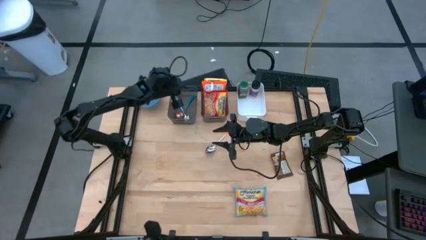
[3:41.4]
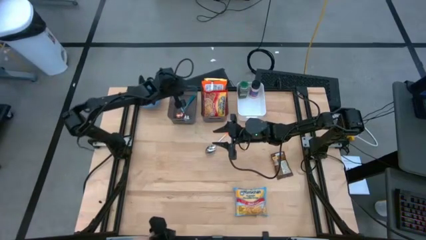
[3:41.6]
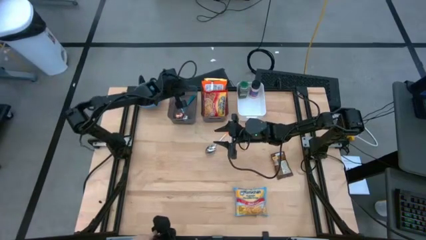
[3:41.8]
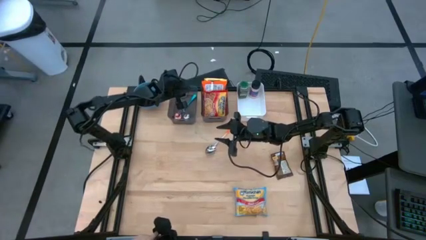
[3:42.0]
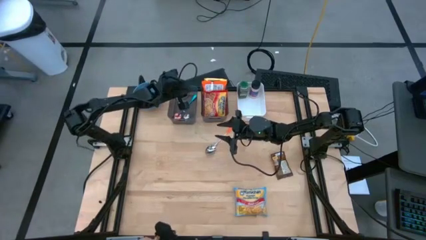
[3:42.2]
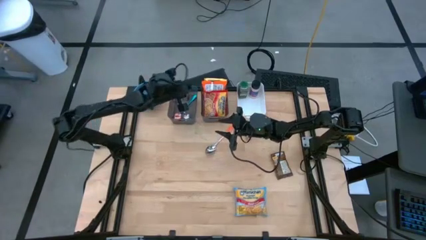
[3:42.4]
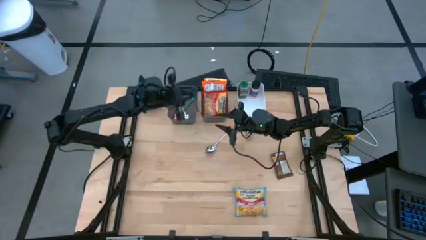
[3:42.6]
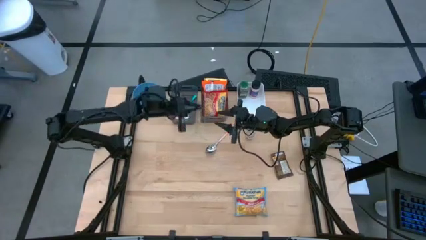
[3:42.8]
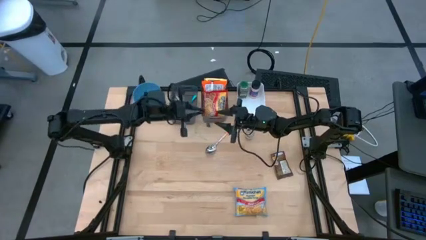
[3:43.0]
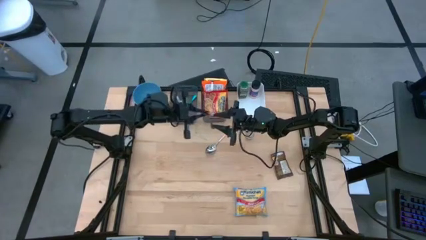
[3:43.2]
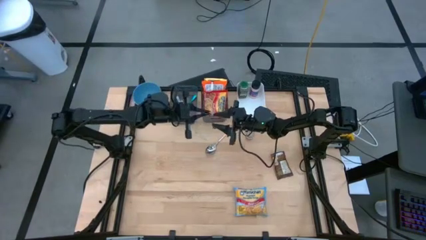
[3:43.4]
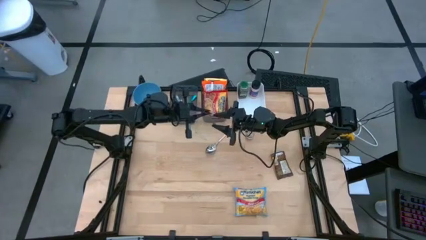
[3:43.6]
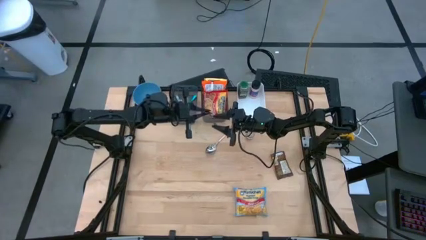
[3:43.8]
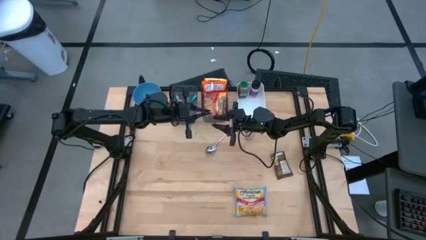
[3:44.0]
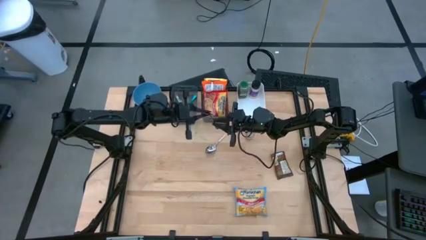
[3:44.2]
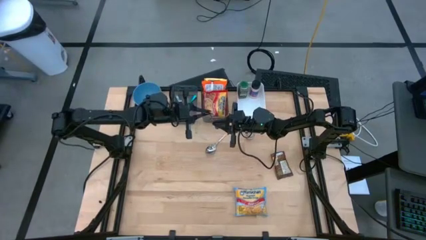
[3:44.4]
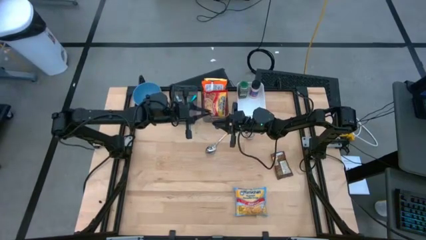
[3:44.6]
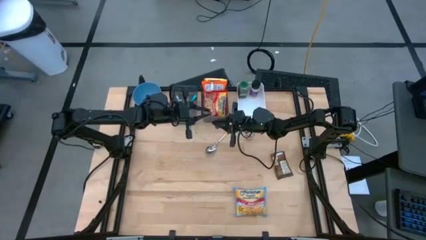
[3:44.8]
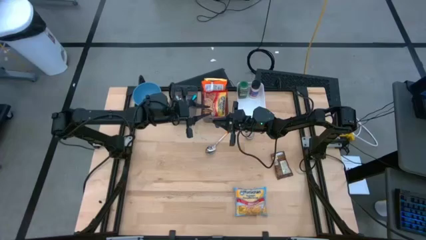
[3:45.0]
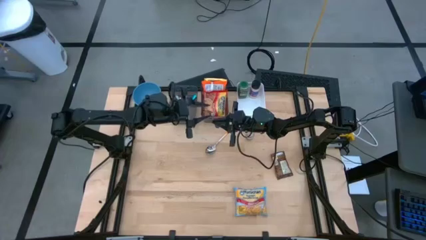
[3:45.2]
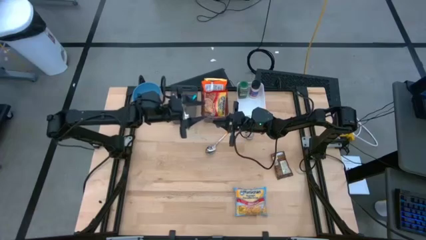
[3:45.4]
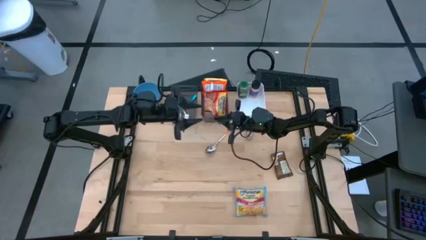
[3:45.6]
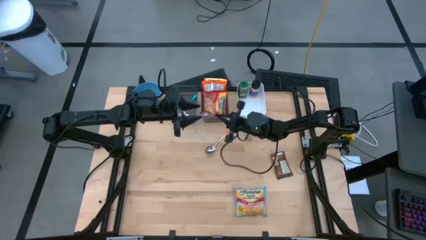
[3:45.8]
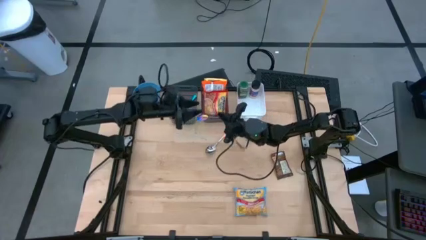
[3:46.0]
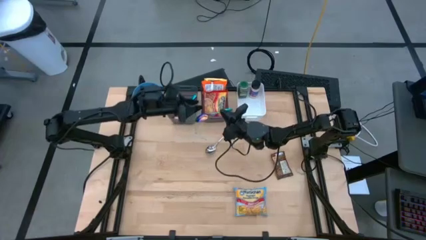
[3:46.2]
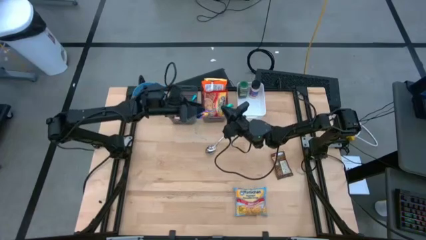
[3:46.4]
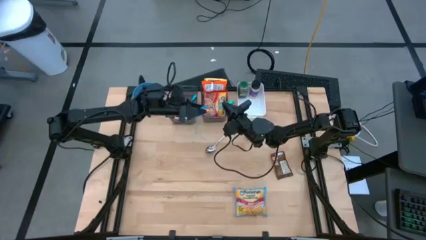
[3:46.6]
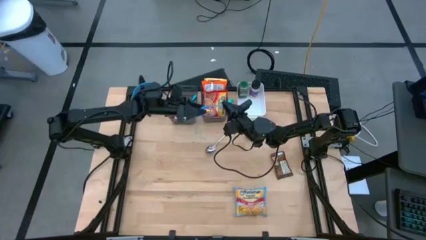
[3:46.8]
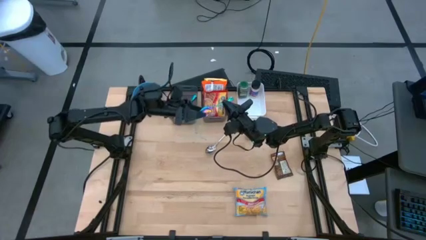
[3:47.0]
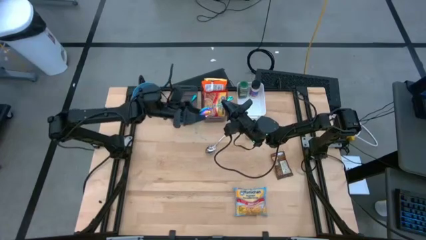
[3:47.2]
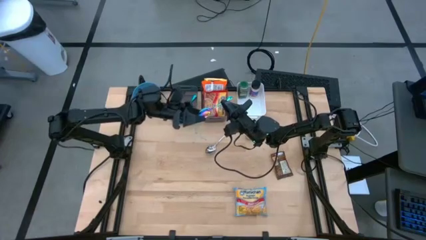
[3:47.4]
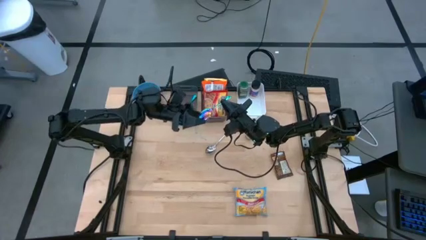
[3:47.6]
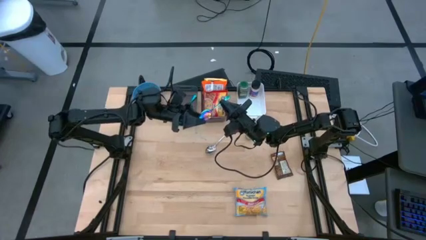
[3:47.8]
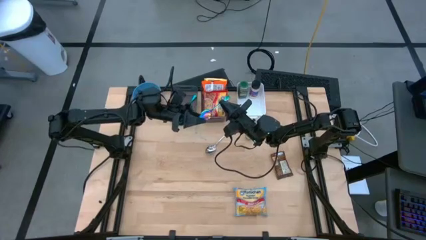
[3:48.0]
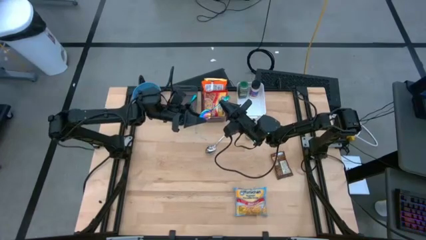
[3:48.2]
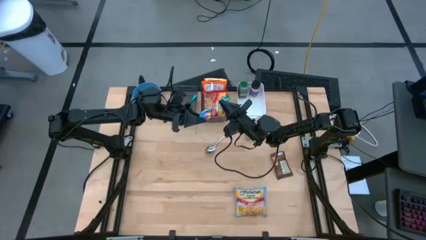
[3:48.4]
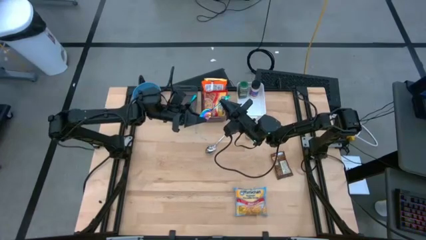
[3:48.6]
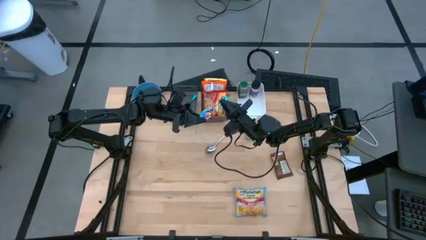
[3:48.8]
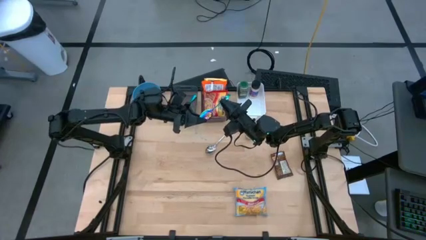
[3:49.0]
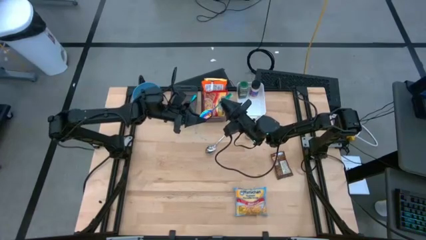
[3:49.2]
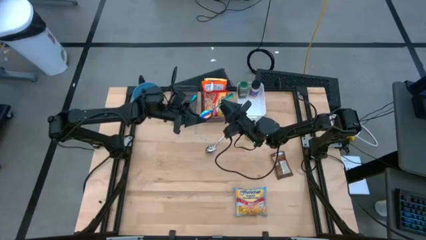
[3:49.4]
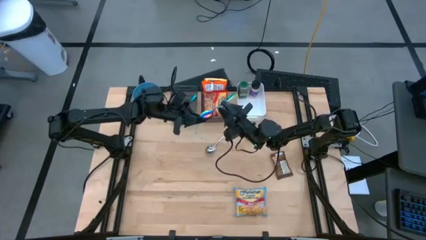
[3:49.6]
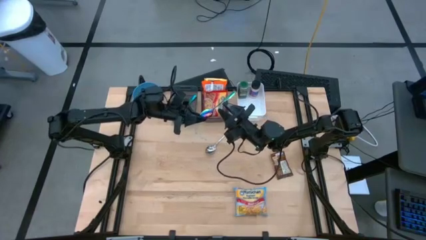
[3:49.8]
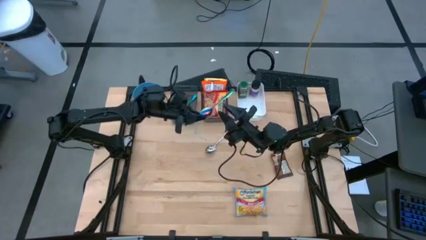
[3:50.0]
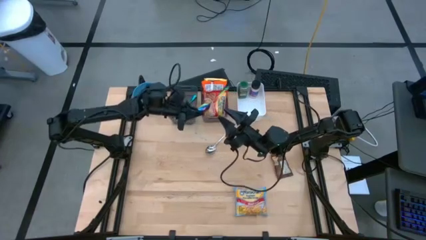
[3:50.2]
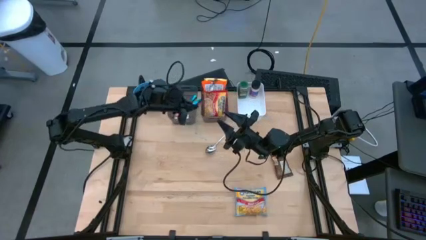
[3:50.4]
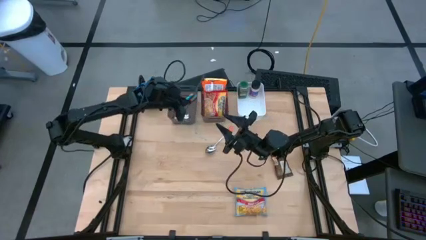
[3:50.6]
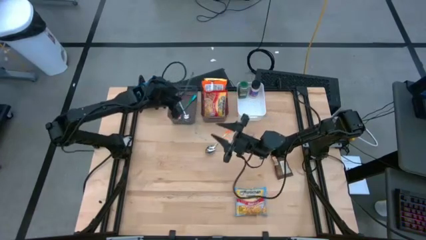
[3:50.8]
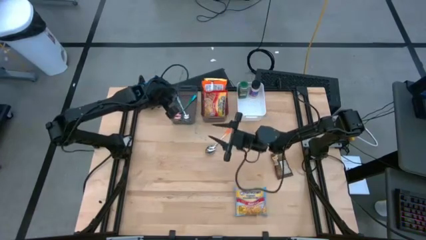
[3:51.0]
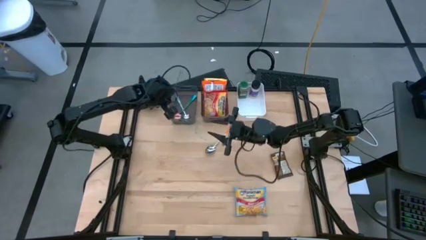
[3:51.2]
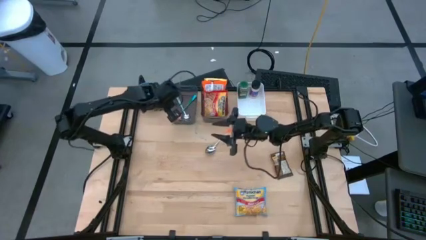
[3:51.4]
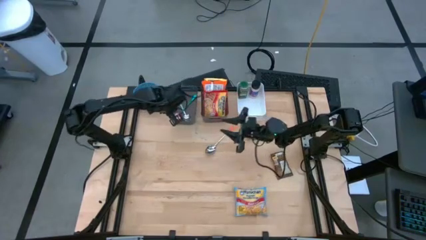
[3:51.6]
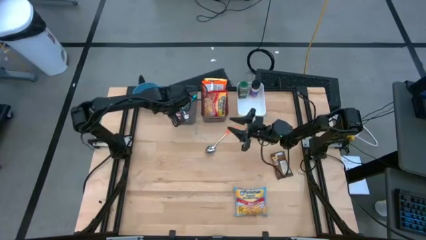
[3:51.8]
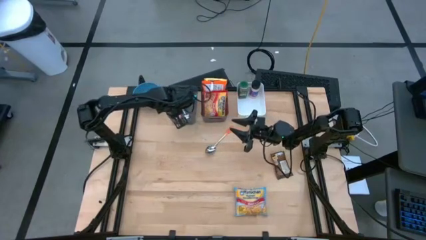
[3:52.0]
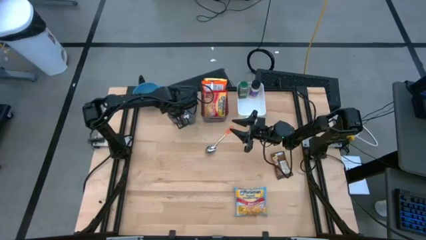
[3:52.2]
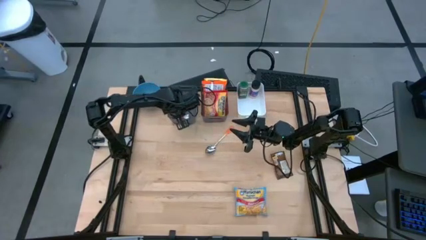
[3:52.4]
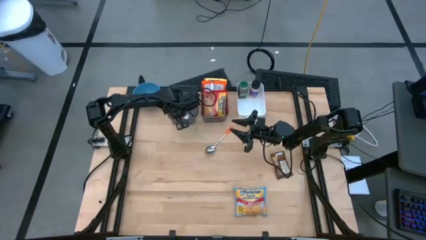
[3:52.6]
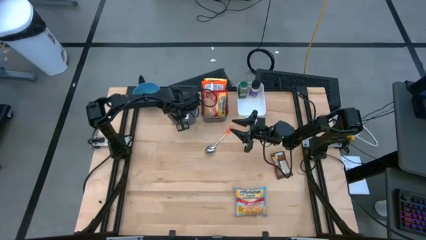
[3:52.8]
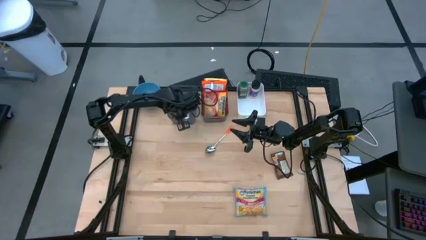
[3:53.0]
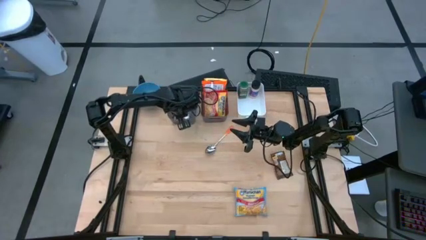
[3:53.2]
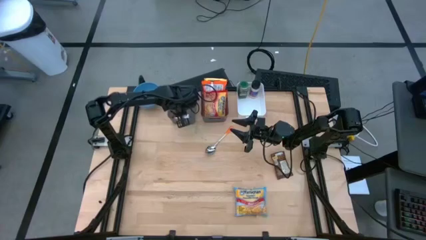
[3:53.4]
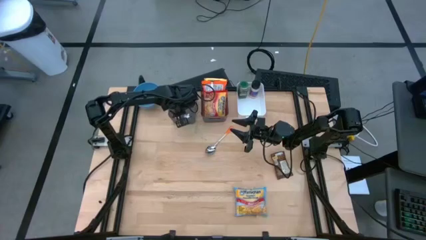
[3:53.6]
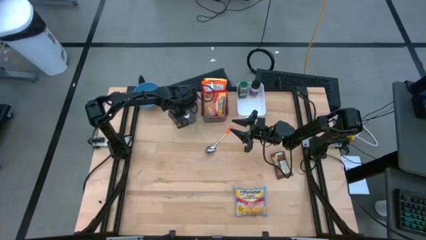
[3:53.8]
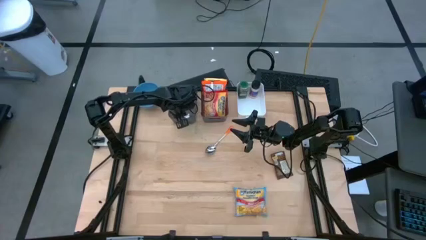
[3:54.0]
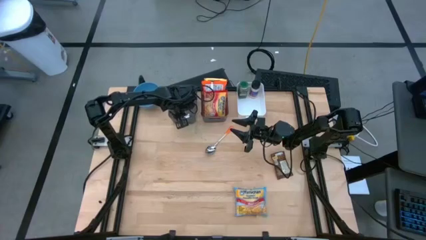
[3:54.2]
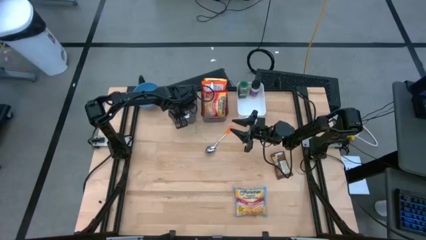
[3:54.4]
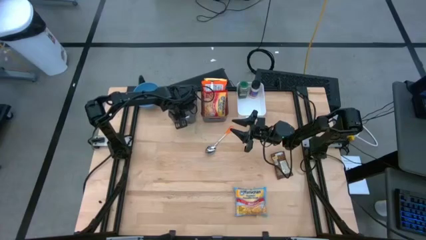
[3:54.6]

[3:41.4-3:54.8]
Task: Pick & Place Food Item
Put the blue spoon into the left black bin

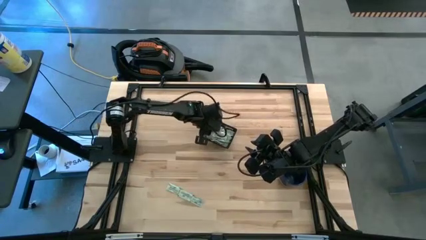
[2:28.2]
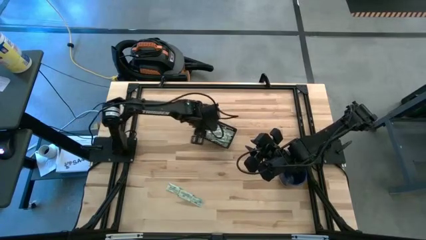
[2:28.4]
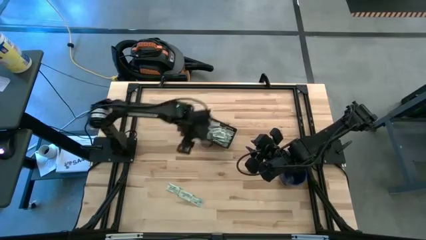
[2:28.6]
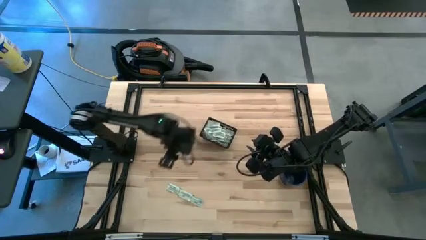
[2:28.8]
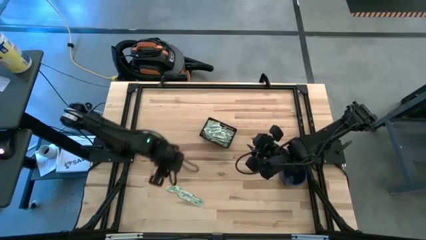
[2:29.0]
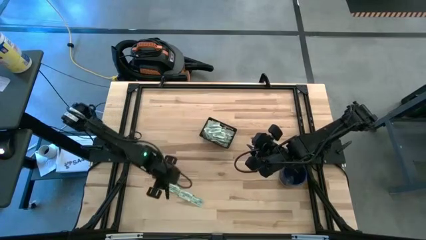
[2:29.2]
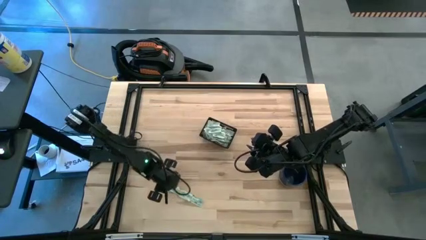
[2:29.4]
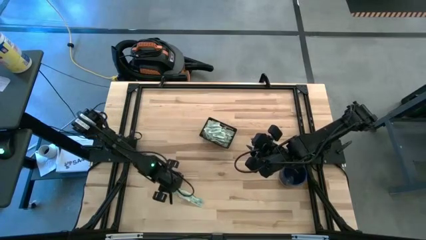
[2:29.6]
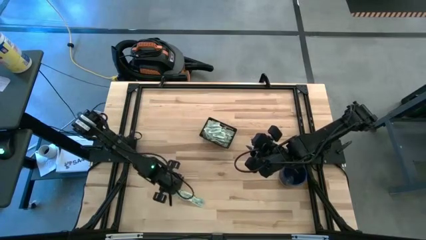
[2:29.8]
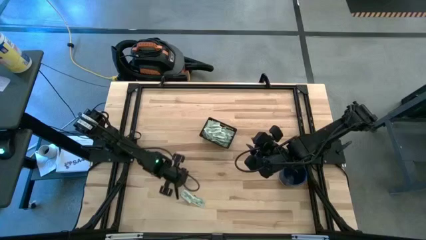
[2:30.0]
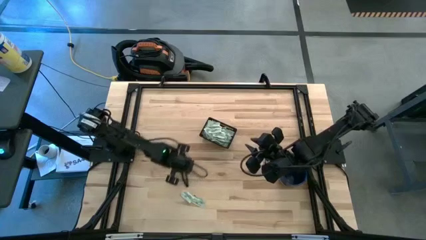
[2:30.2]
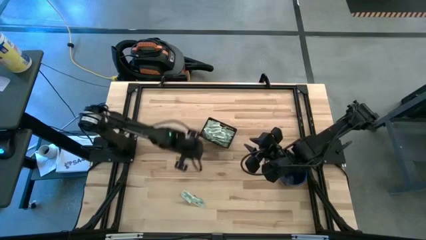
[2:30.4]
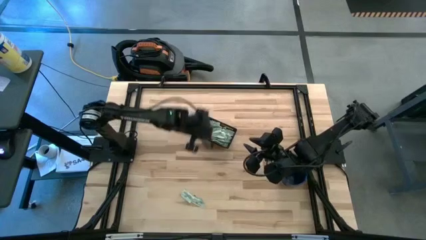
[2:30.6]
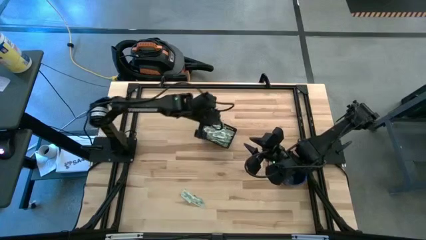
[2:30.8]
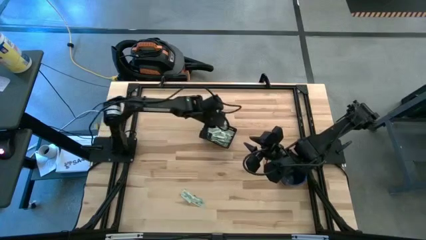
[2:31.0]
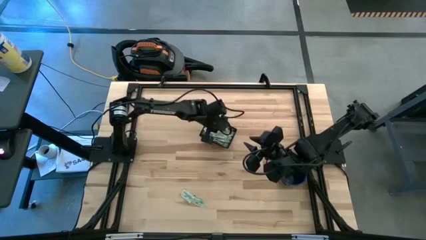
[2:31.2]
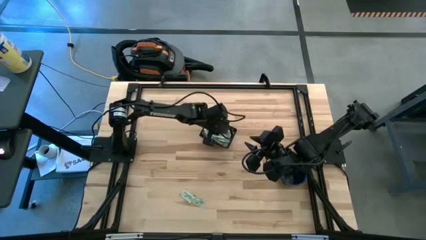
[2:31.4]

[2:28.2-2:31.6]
Task: Pick and place Stevia / Truvia into bins
Put the stevia packet into the black bin

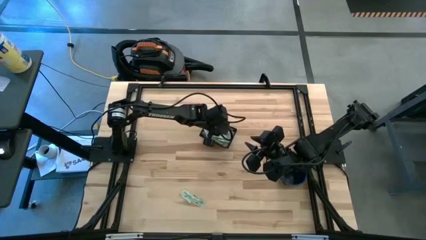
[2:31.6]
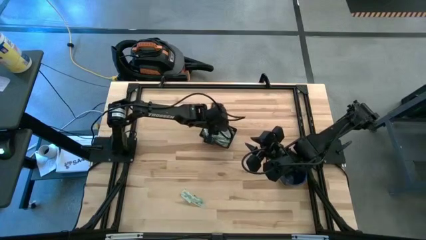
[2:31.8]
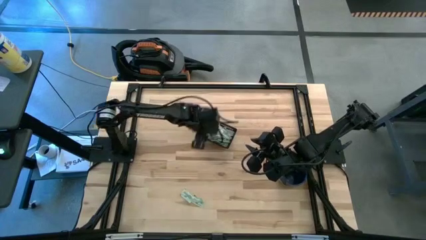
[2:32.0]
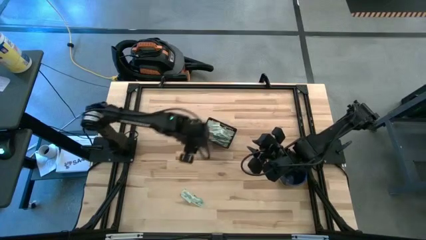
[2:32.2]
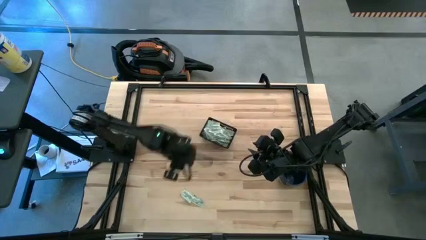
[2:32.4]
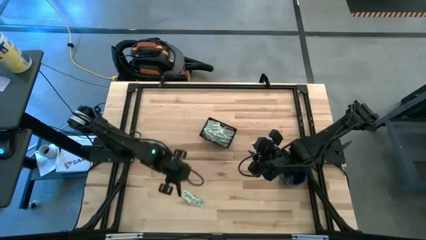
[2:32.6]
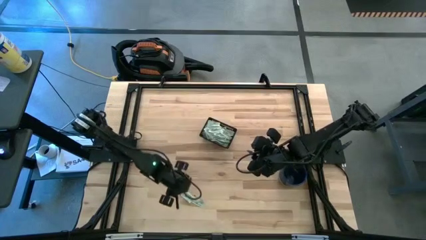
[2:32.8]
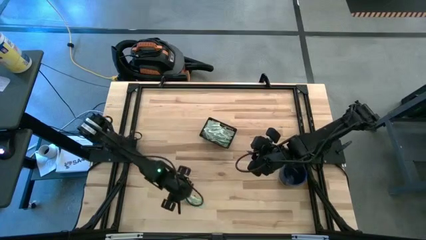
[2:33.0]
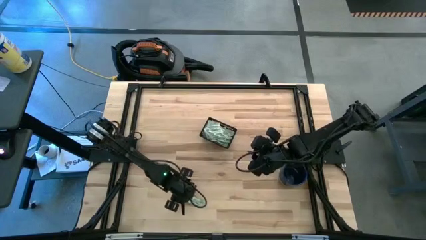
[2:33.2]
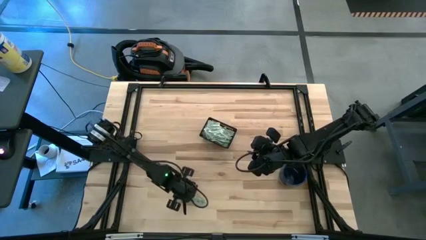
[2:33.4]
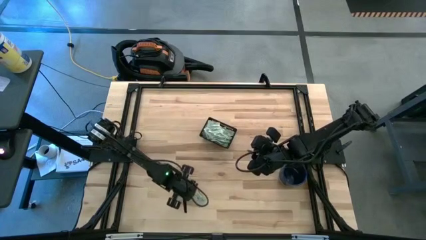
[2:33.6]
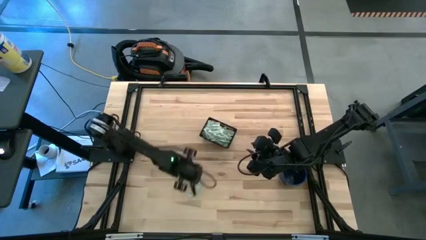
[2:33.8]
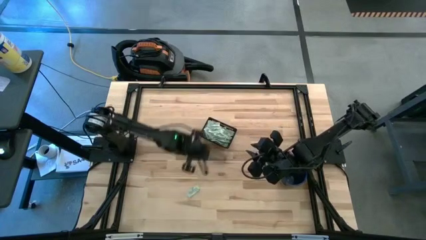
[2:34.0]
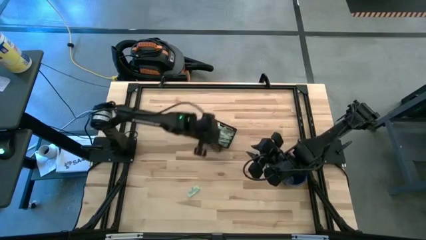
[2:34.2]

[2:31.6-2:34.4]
Put the stevia packet into the black bin
